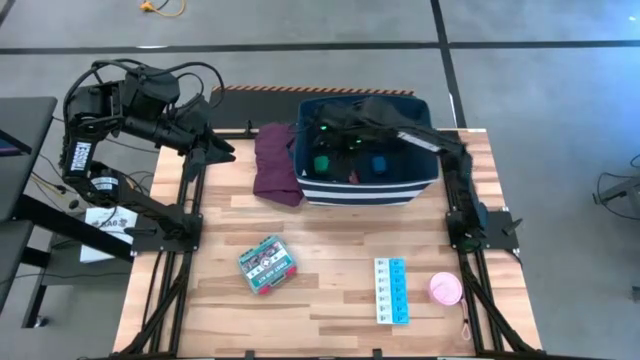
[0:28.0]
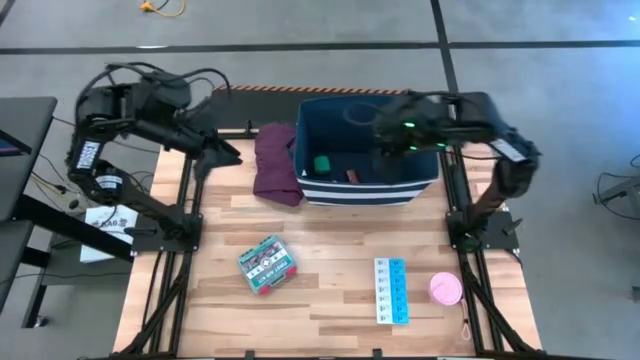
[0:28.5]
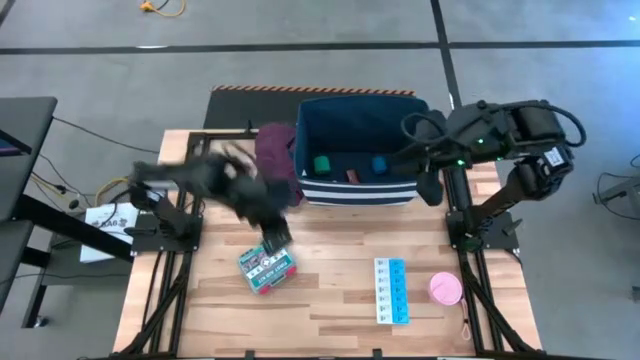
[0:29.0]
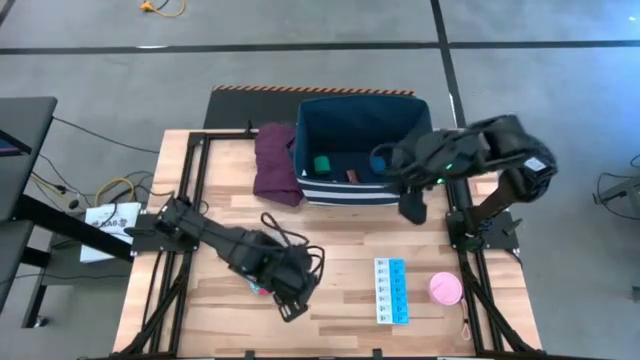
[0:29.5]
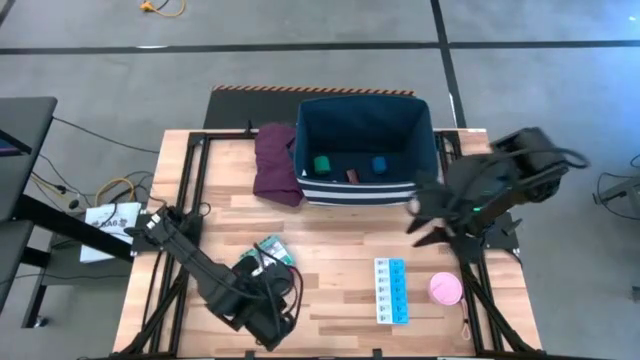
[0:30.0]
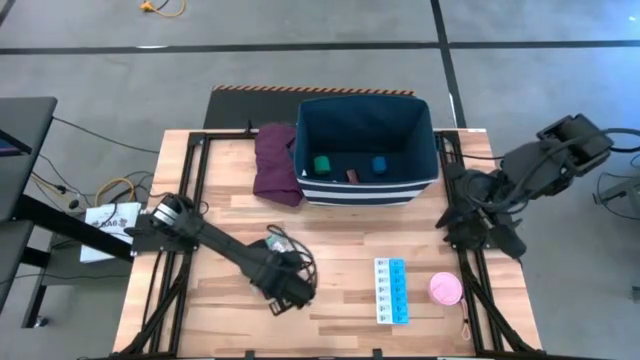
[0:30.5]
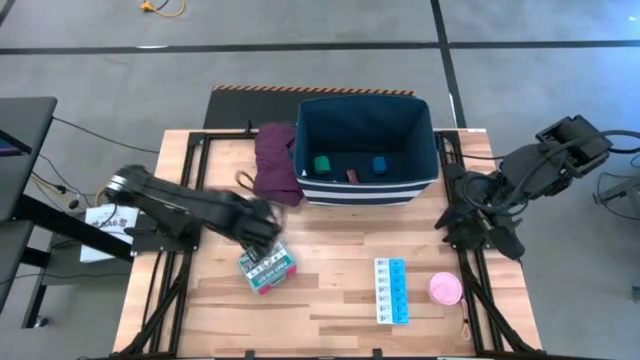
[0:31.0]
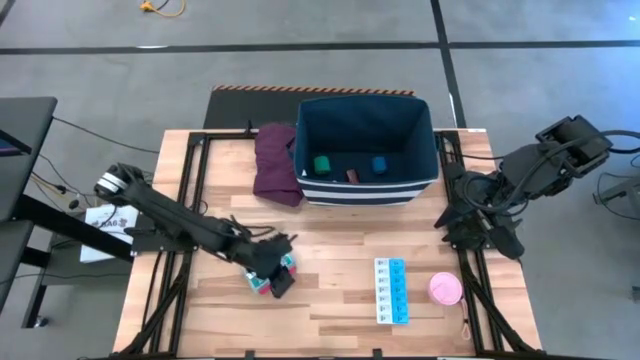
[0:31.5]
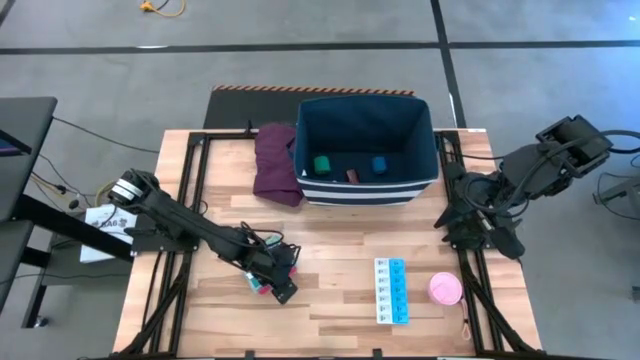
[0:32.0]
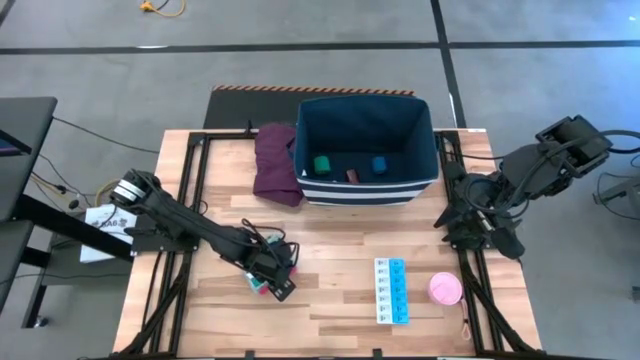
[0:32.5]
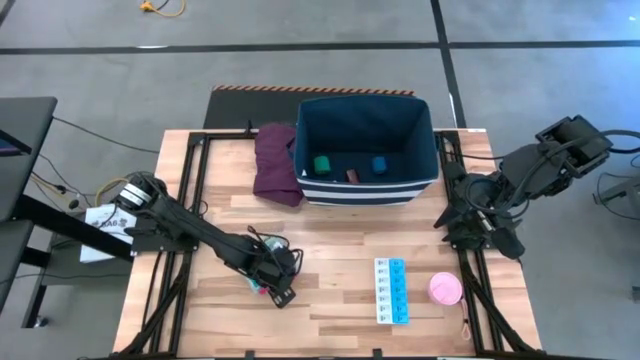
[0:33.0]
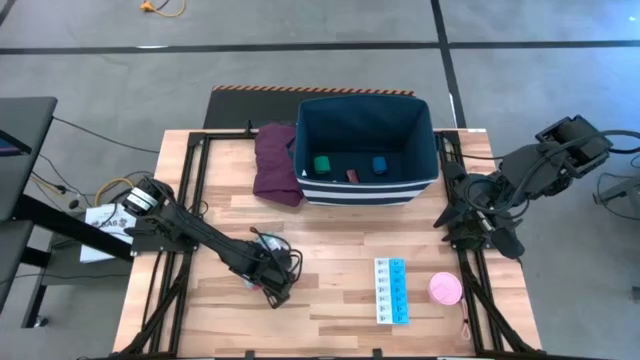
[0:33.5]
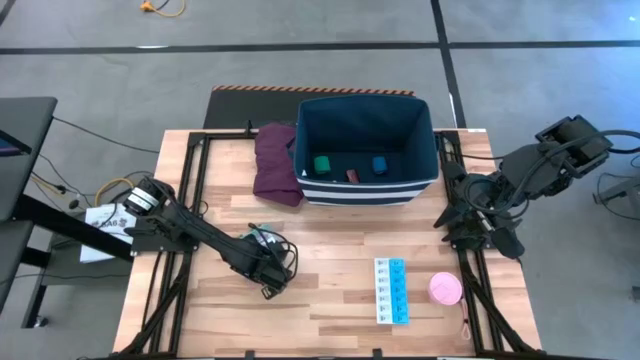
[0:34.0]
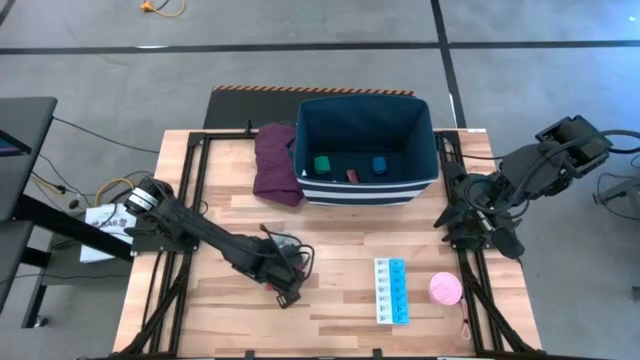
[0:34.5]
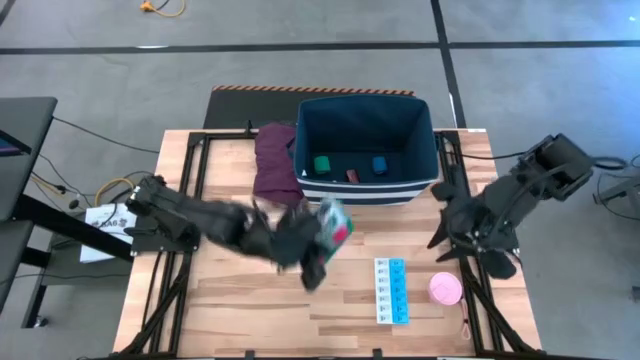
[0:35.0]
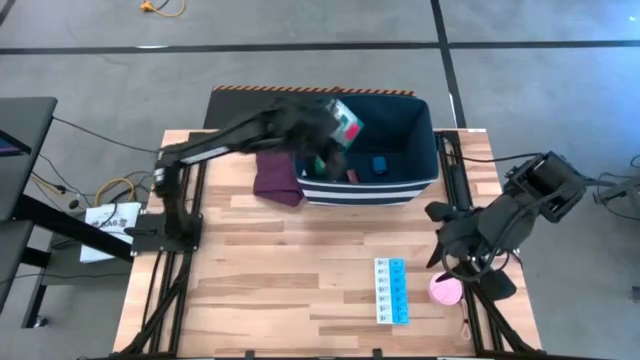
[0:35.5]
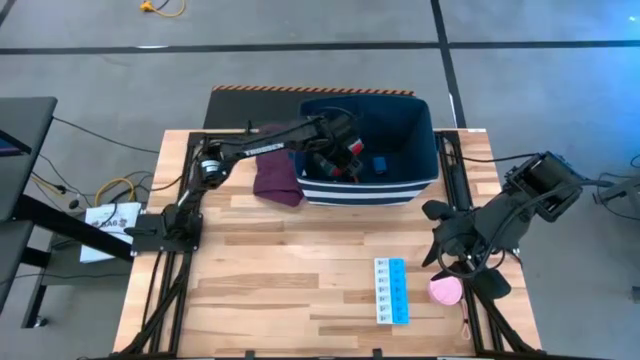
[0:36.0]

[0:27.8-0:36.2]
Task: Pick & place medical supplies in basket/bin
Put the green first aid kit into the blue organizer

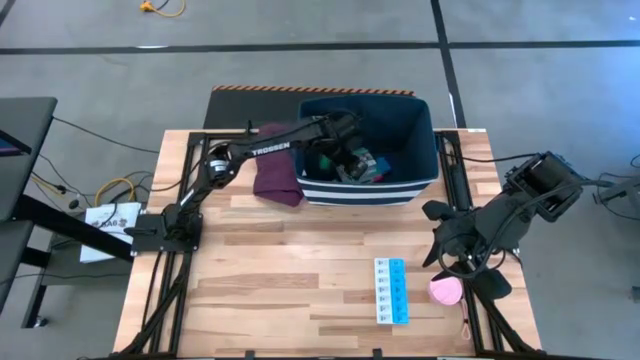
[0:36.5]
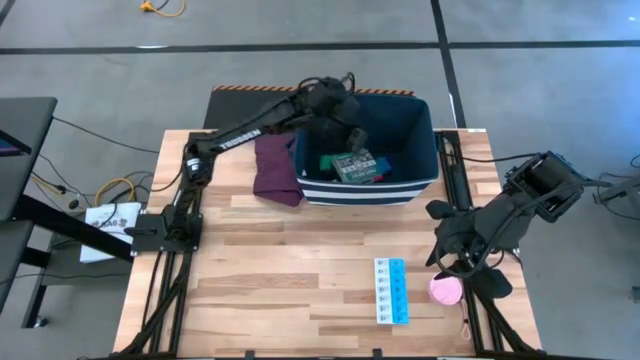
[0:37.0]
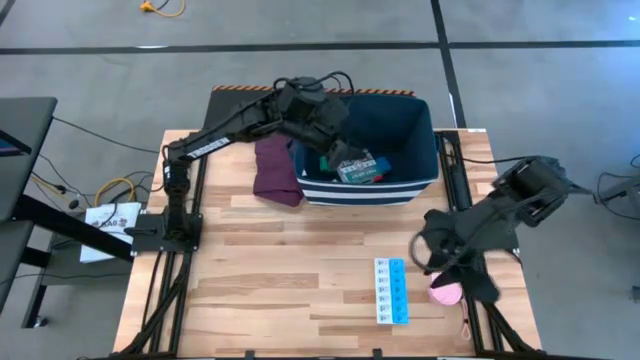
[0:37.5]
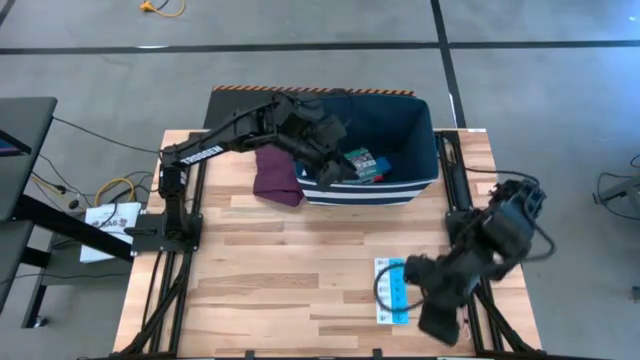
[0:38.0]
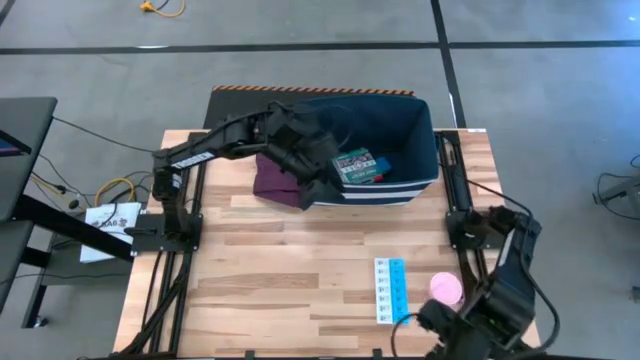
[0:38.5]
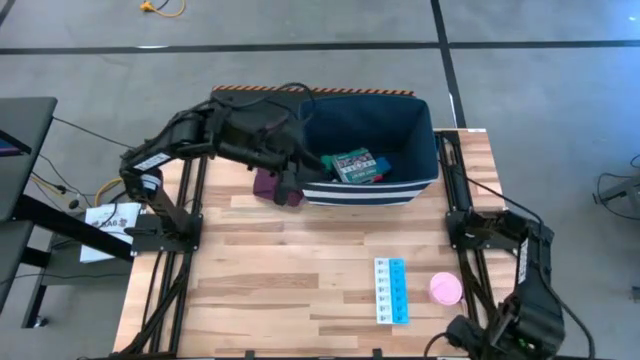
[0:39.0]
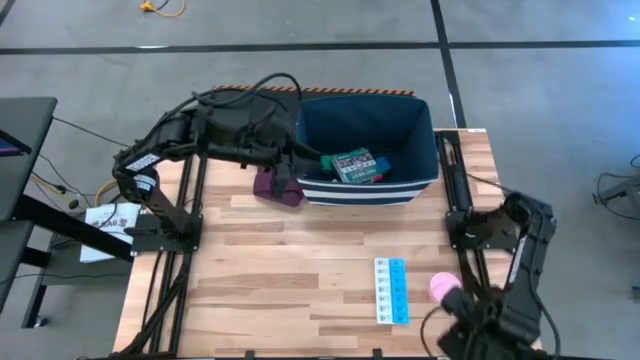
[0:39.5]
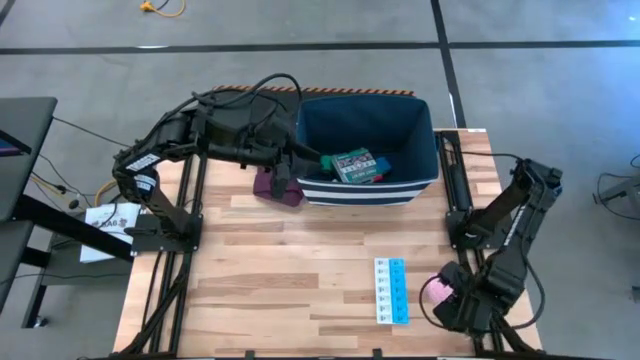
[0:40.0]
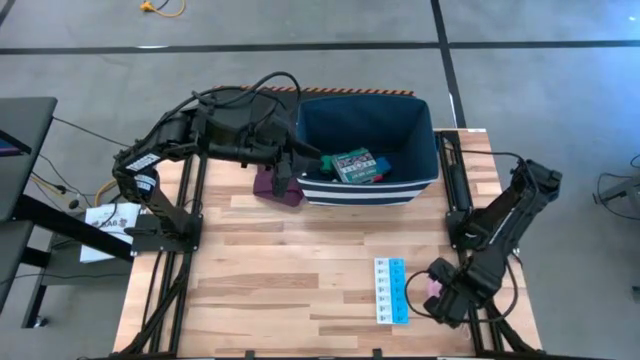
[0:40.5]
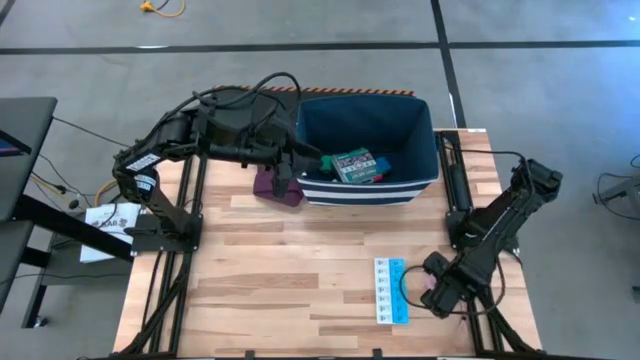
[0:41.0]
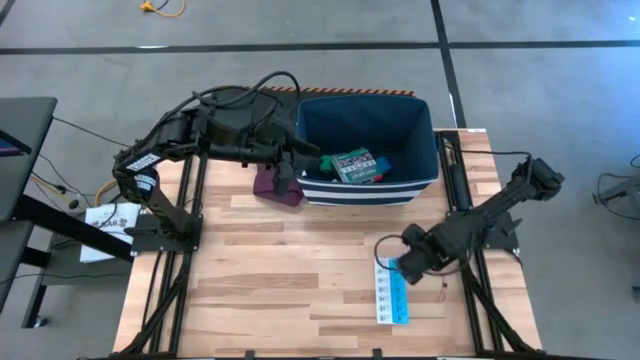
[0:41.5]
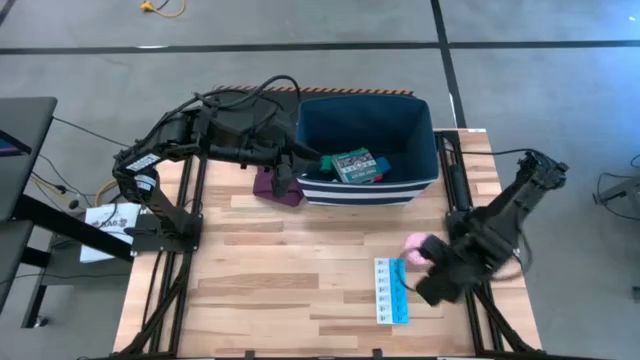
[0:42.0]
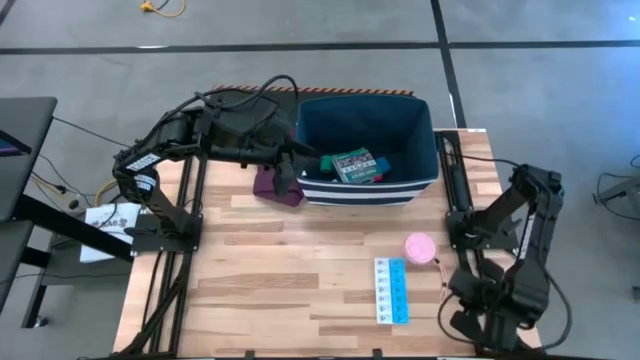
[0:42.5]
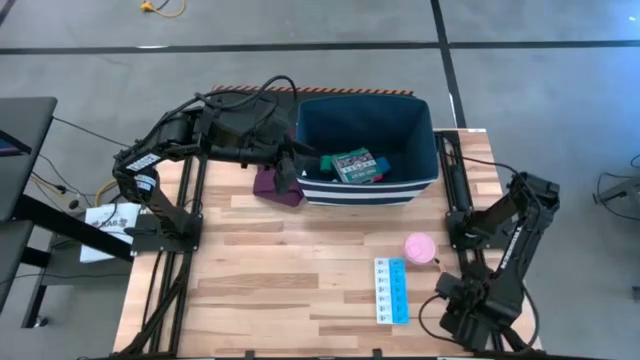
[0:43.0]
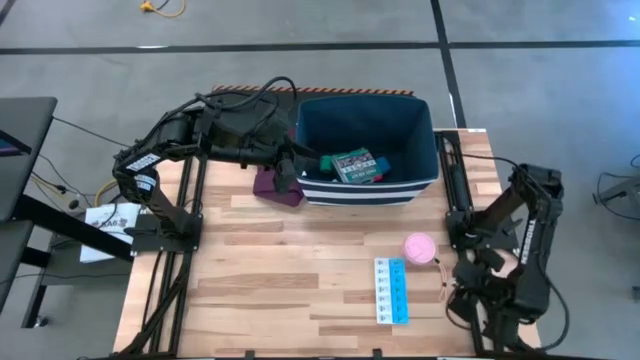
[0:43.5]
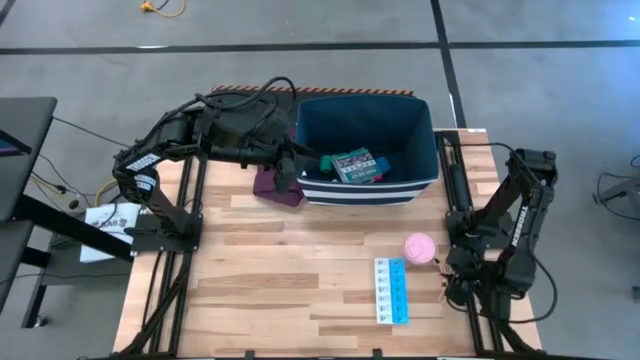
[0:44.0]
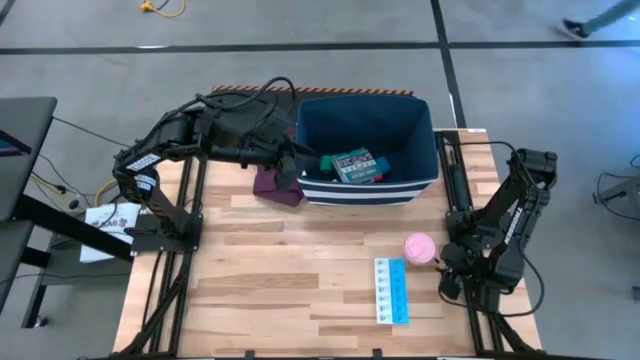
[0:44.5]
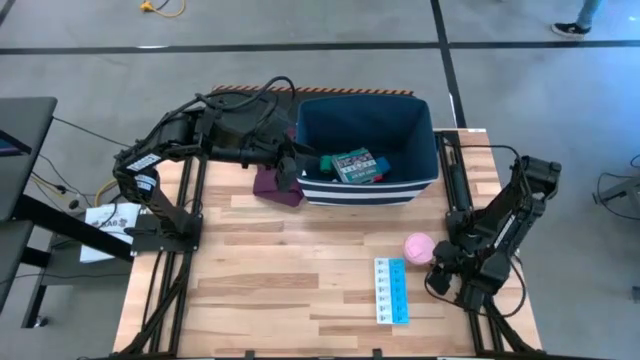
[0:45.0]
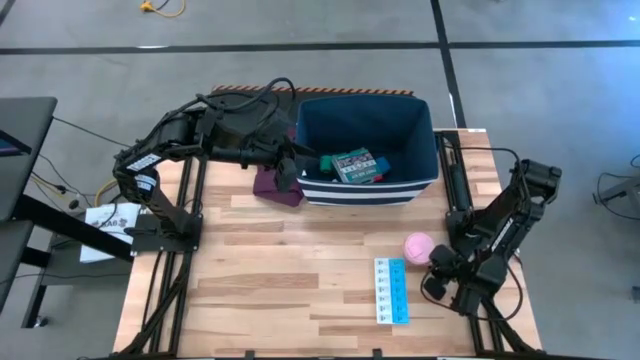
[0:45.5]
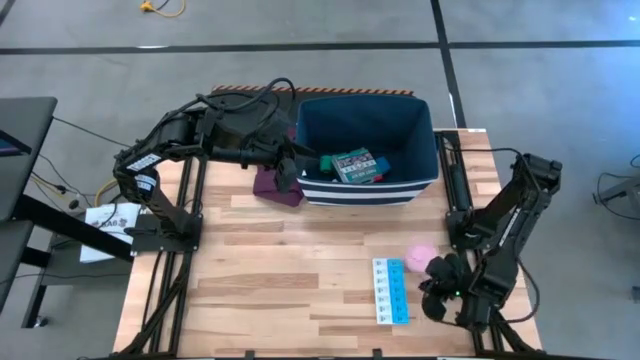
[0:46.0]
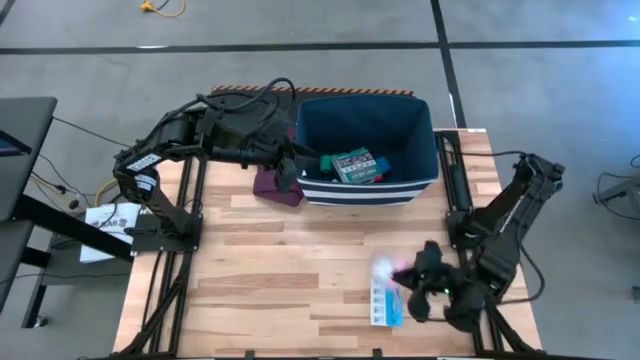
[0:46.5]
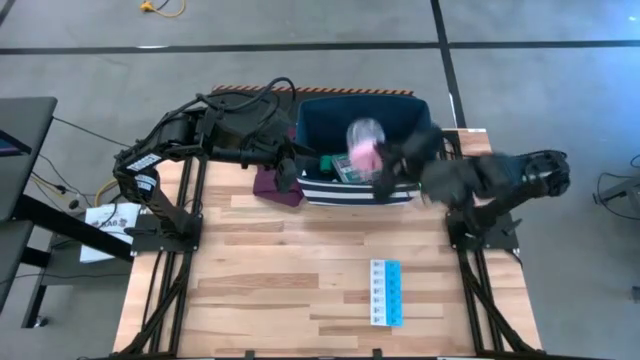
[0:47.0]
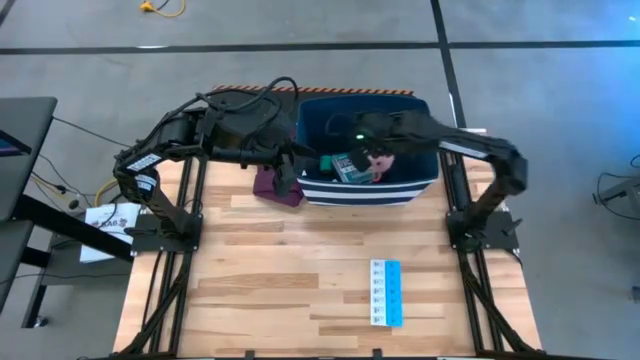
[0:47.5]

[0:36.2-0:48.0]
Put the pink container into the blue organizer
